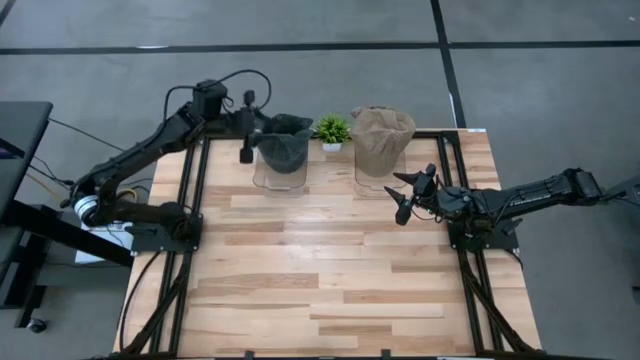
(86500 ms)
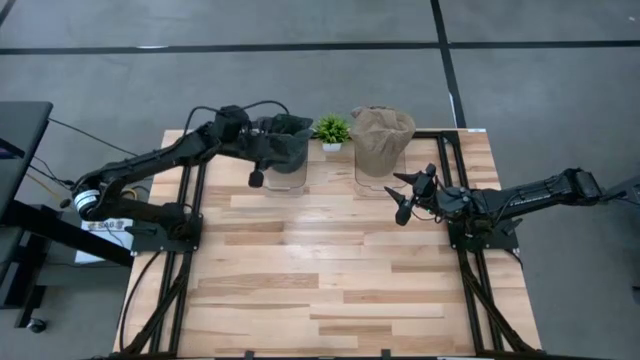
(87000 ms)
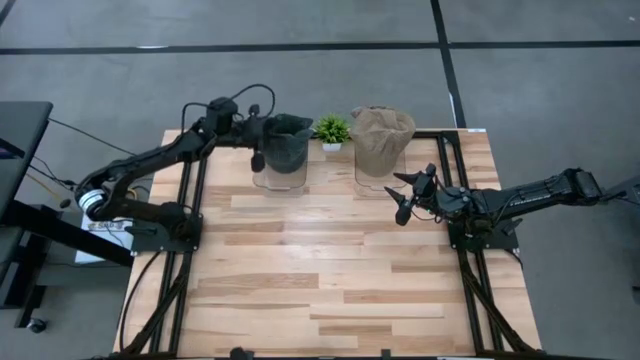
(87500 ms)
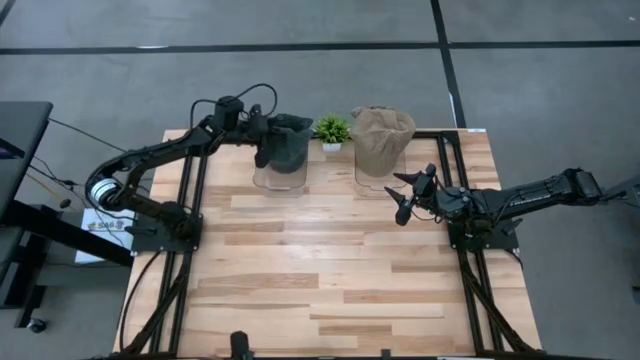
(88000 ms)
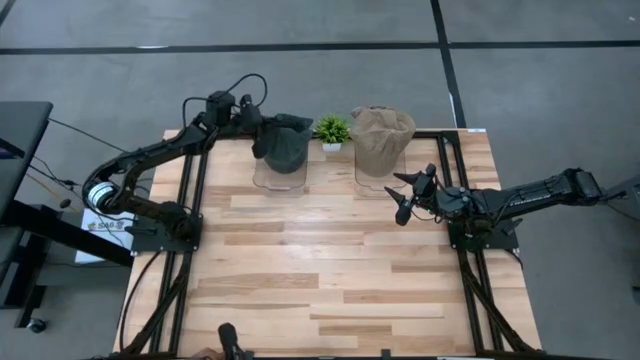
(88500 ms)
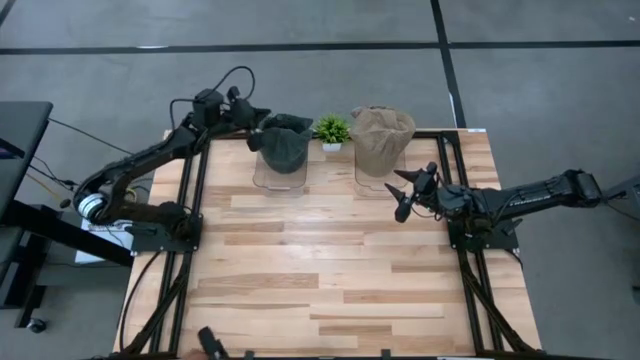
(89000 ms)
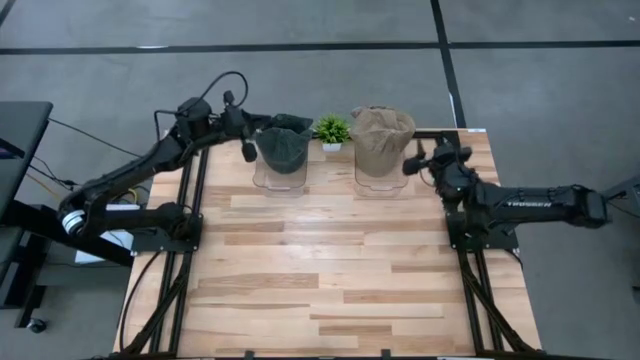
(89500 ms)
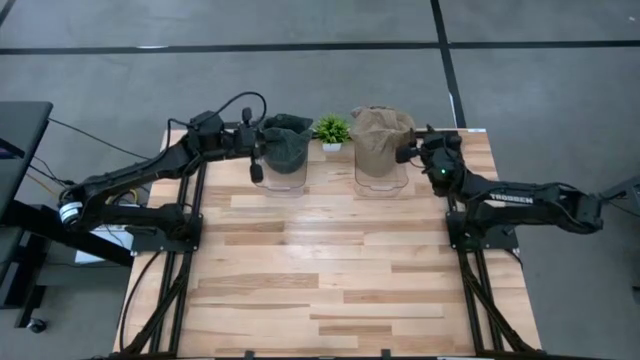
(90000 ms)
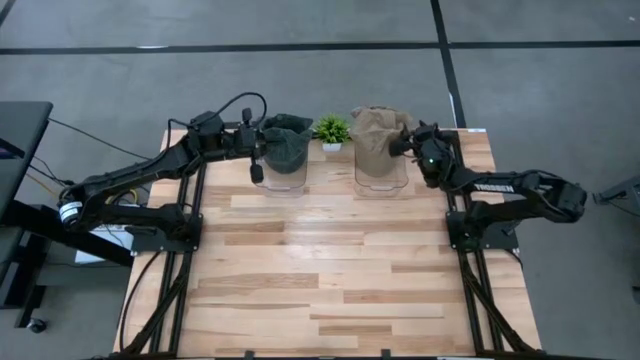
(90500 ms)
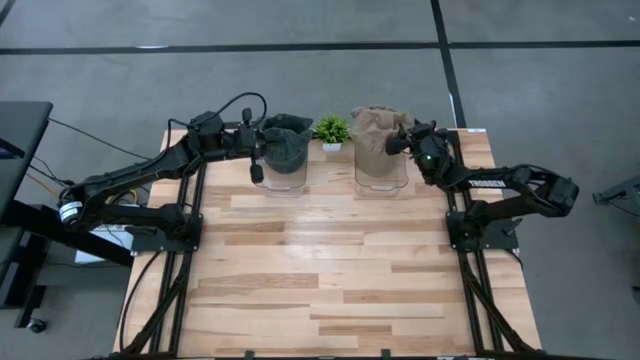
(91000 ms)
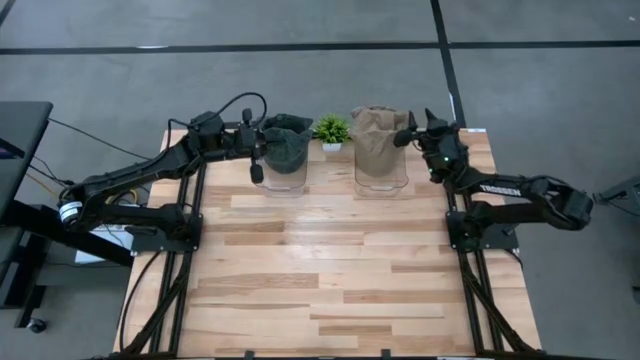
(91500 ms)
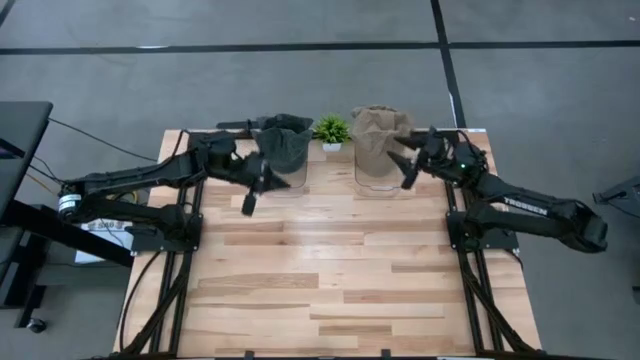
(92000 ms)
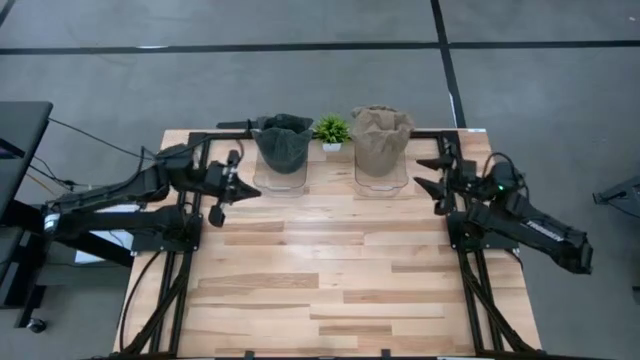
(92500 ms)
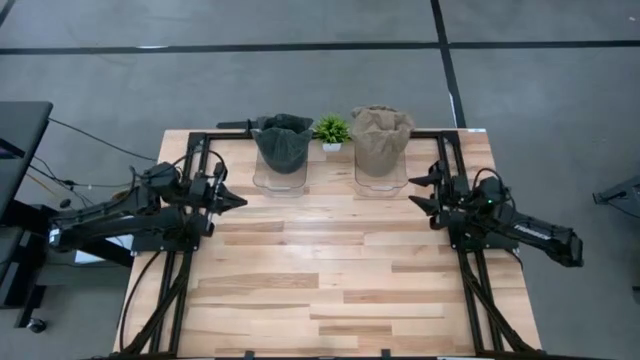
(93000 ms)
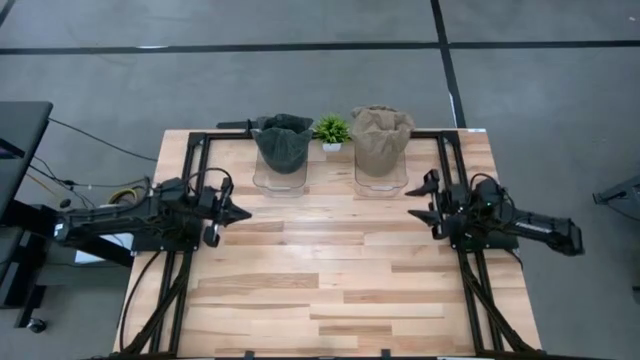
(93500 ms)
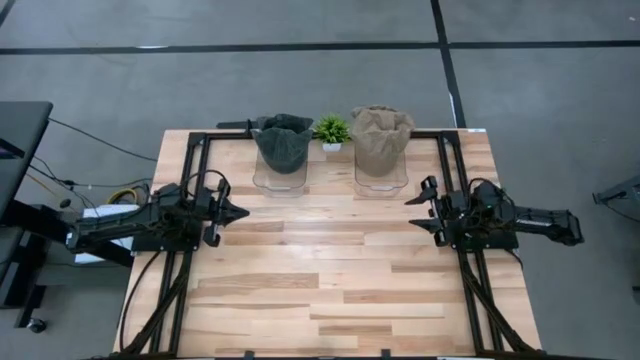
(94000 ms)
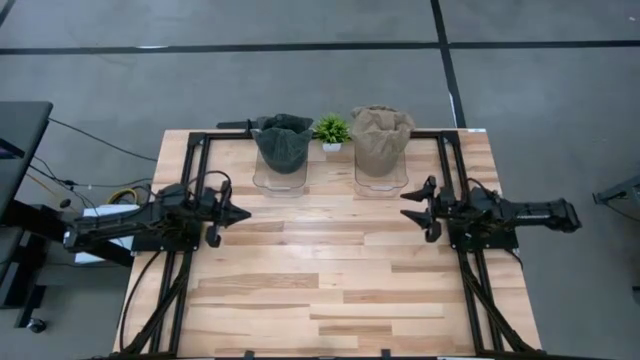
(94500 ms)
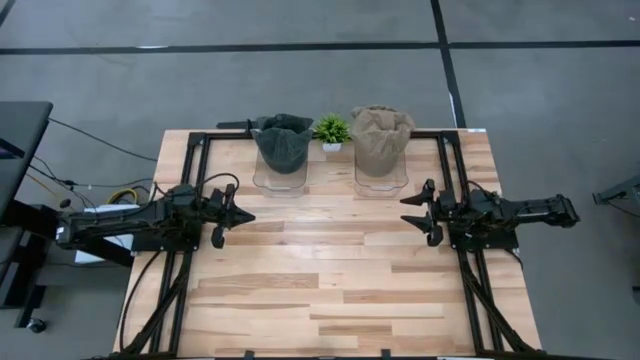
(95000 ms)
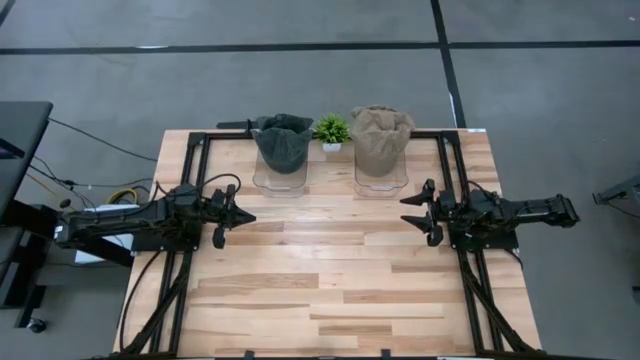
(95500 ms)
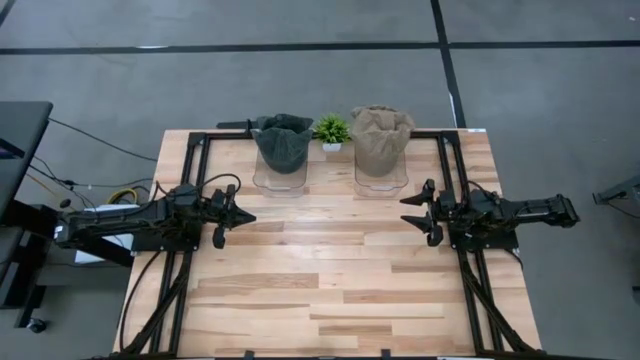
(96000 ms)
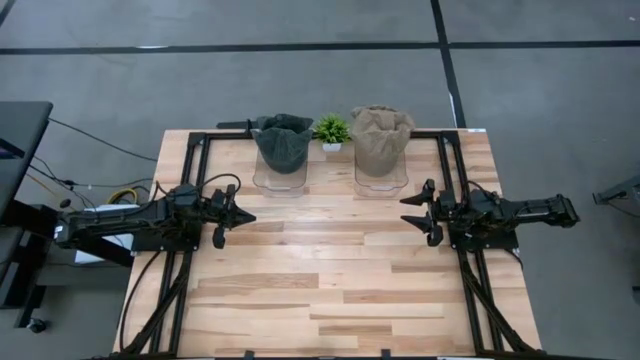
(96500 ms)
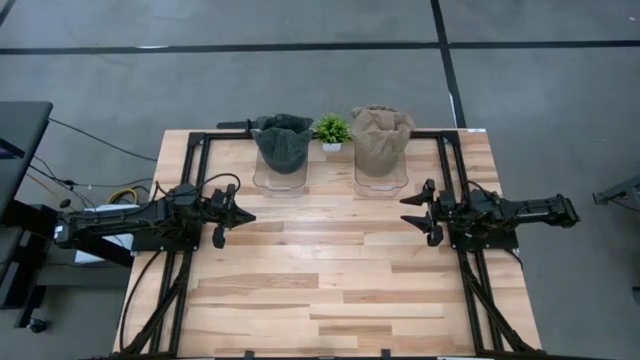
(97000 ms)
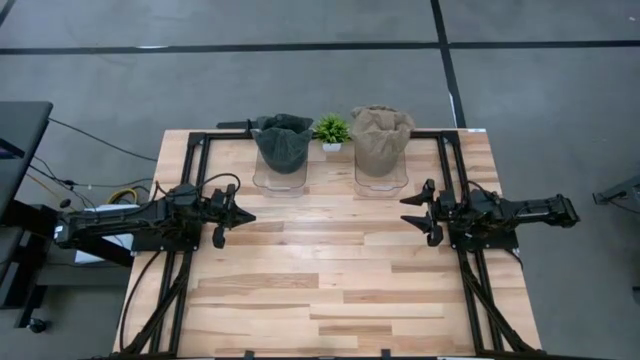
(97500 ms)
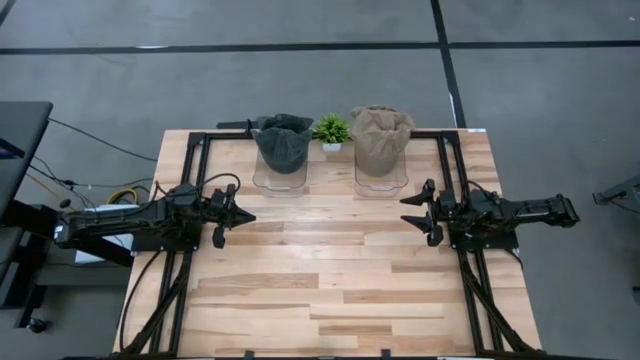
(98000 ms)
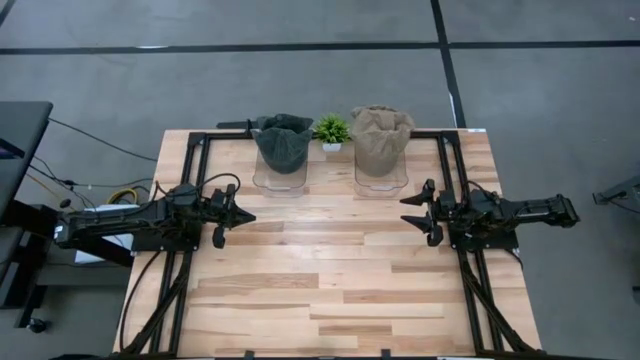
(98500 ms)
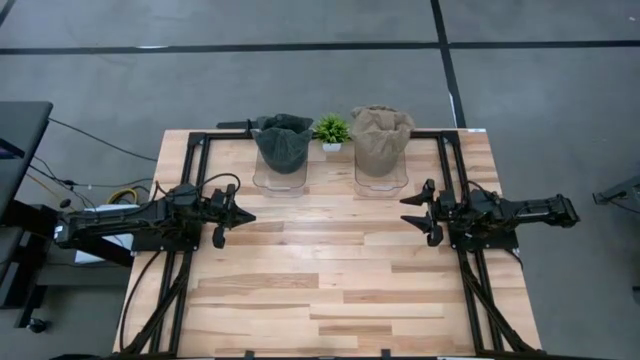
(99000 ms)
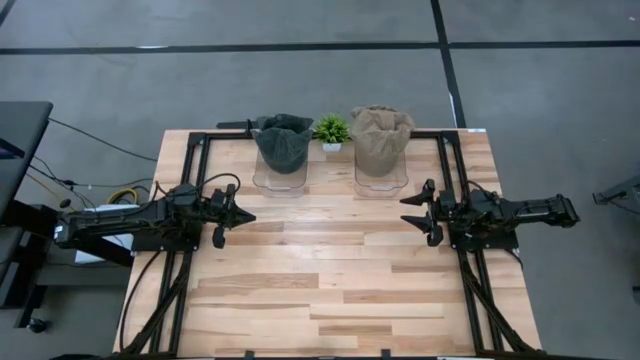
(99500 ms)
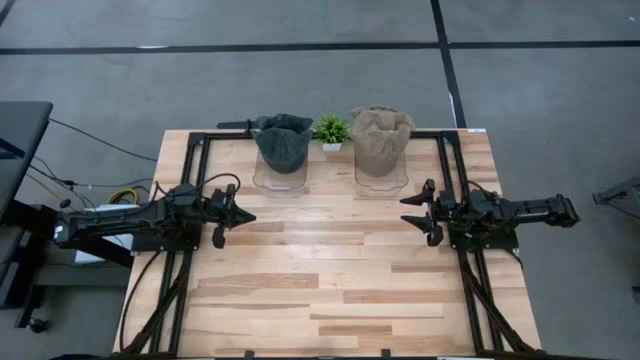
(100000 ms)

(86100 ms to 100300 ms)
Task: Pick & Place hat
Return to Home Position

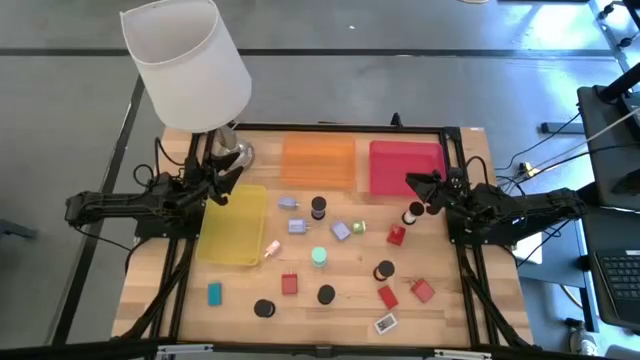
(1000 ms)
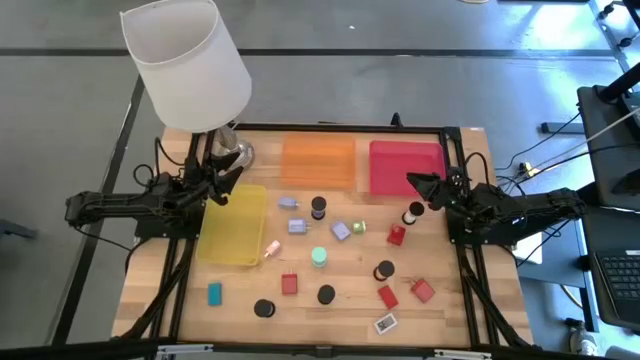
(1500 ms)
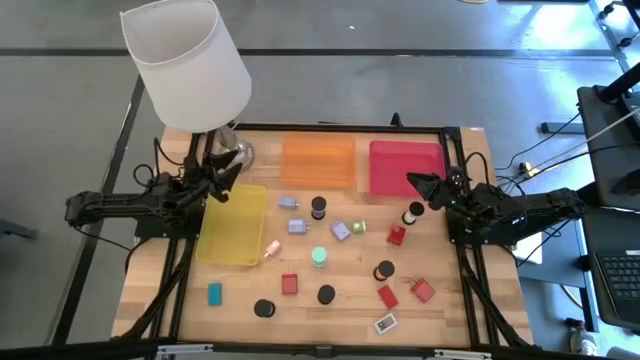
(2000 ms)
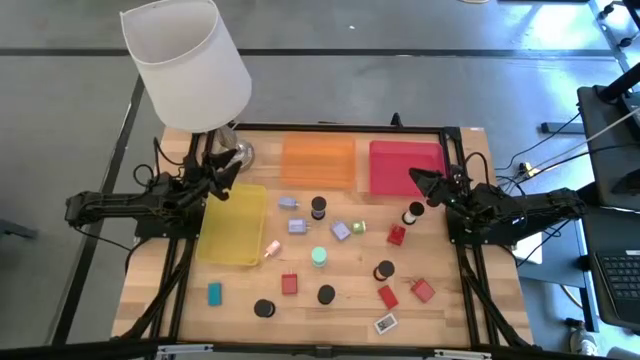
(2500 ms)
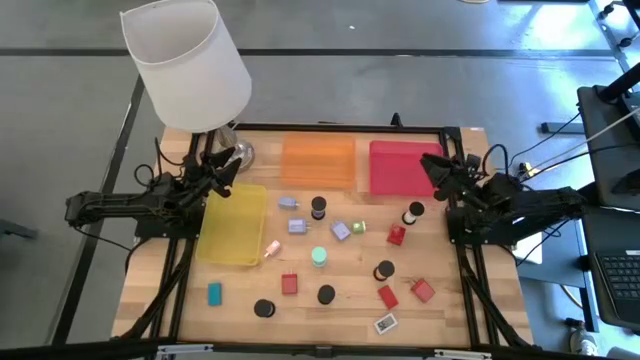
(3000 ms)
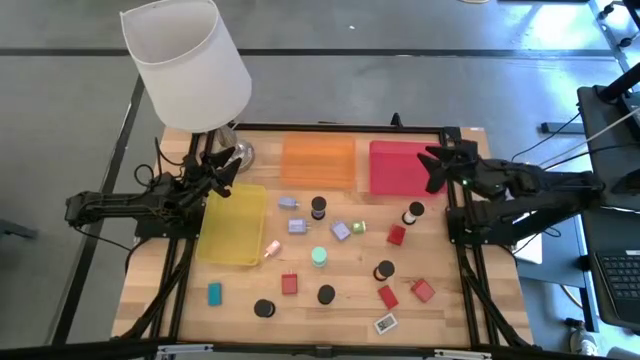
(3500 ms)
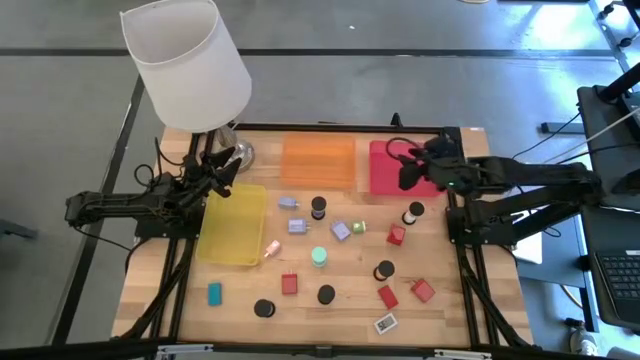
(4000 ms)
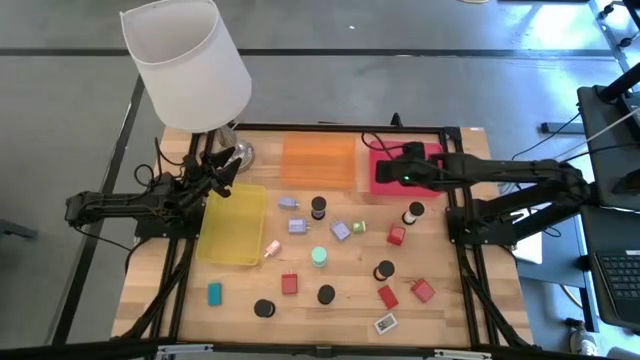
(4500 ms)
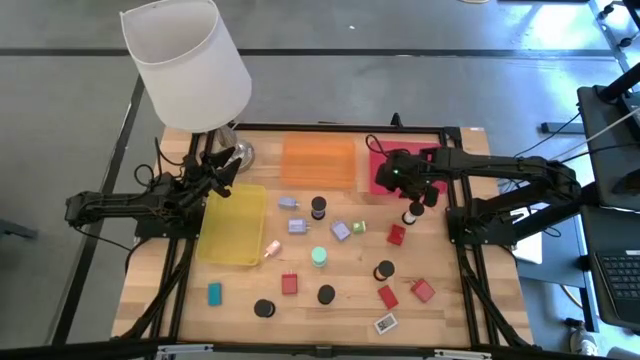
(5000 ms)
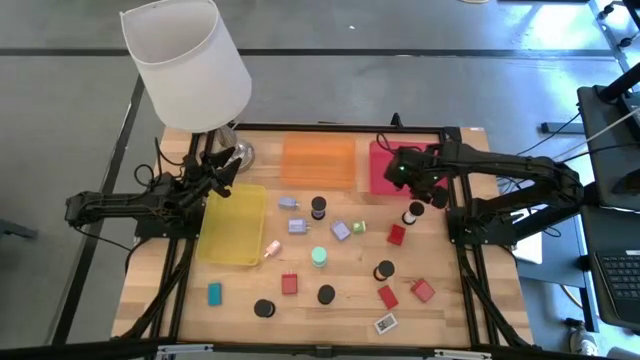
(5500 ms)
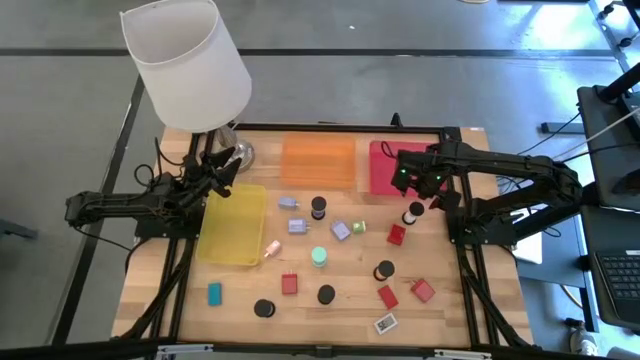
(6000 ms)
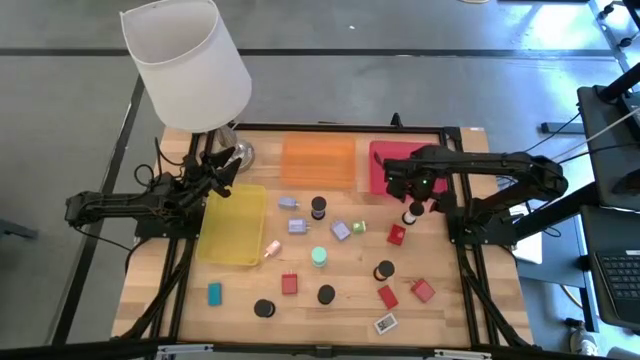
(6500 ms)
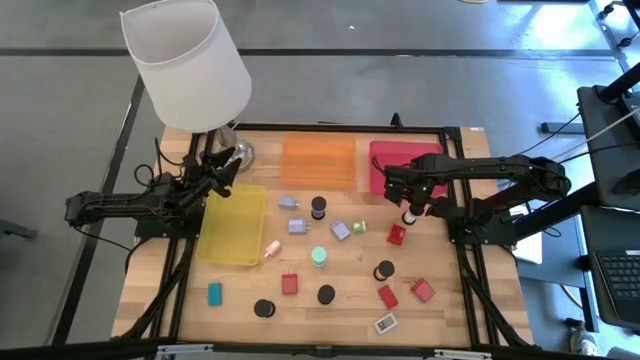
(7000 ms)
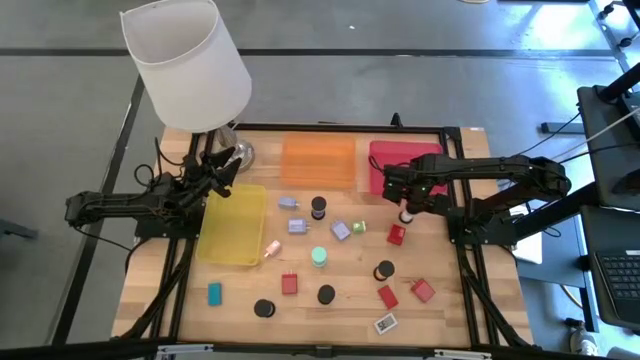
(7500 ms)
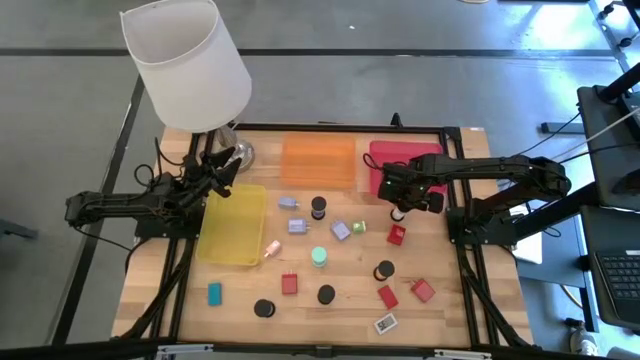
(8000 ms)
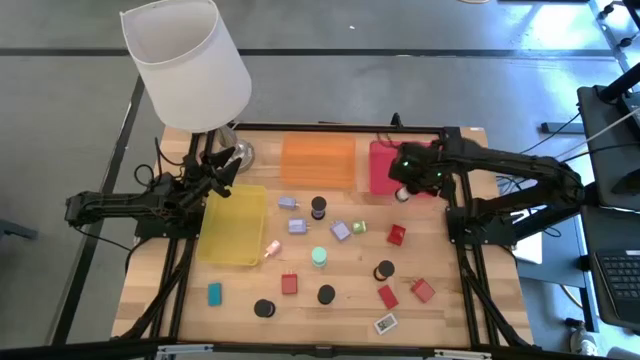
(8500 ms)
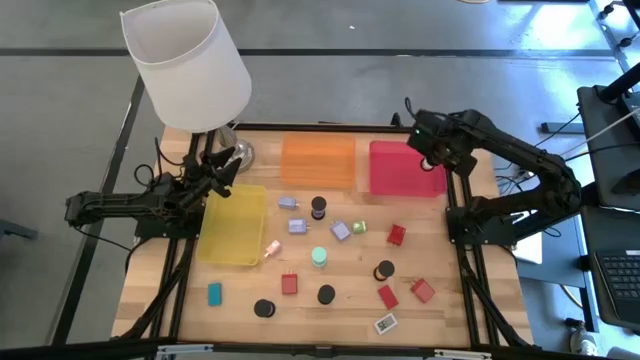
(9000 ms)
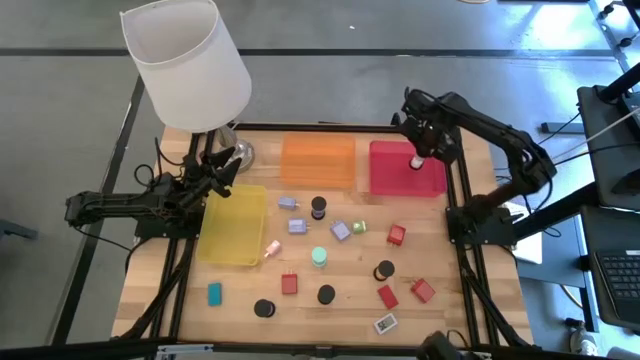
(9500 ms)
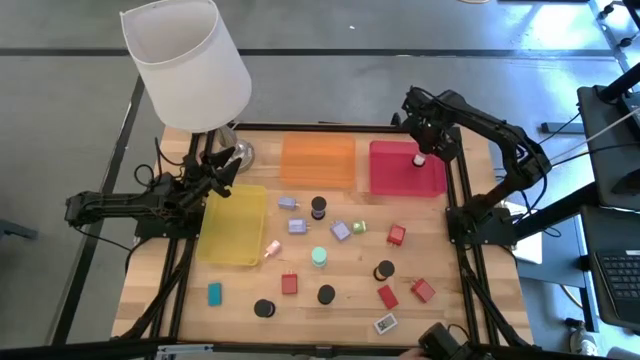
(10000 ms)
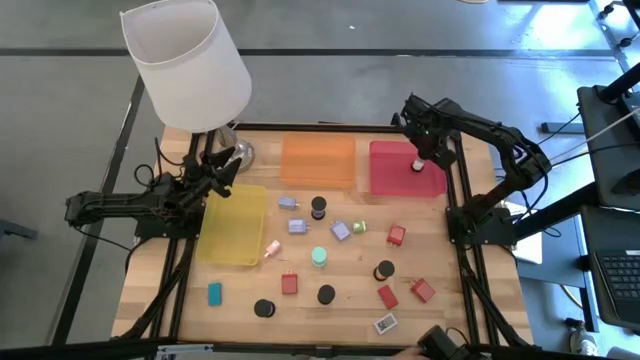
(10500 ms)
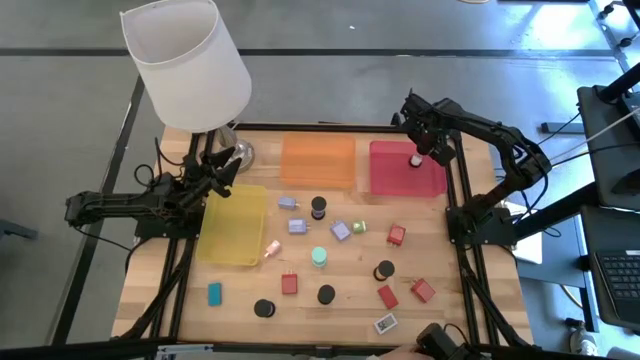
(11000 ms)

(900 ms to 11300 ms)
Task: Pick & Place Office items
Put the white hourglass into the pink bin
